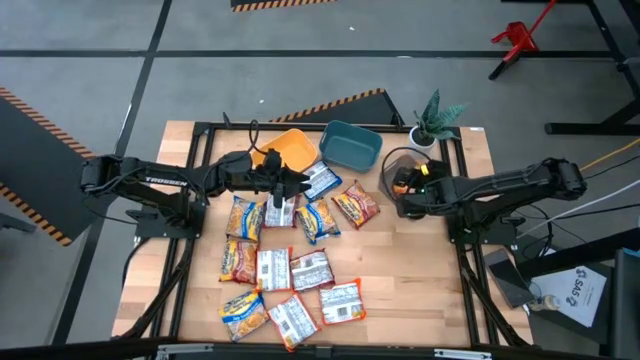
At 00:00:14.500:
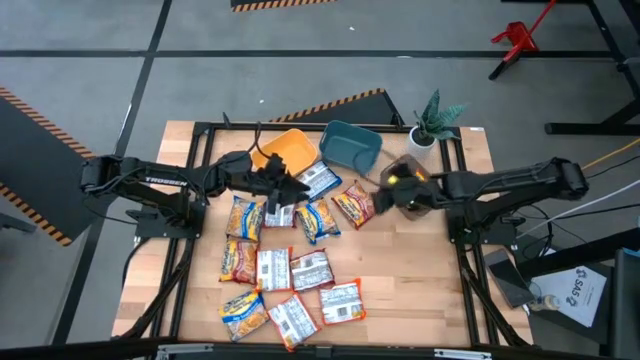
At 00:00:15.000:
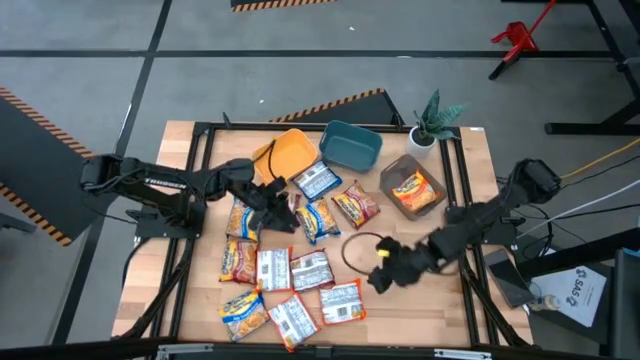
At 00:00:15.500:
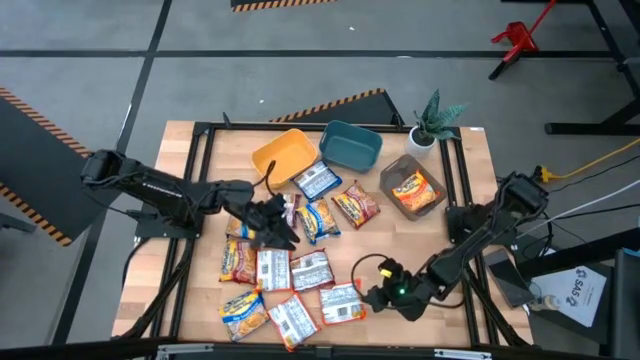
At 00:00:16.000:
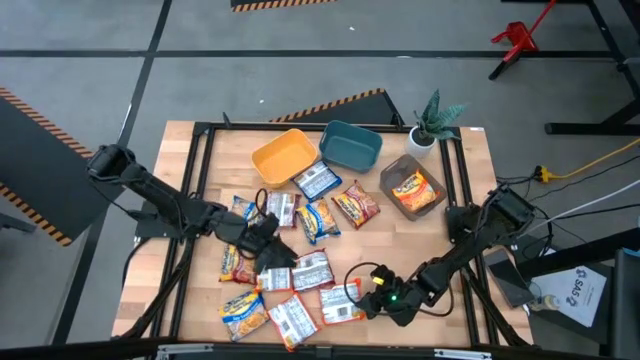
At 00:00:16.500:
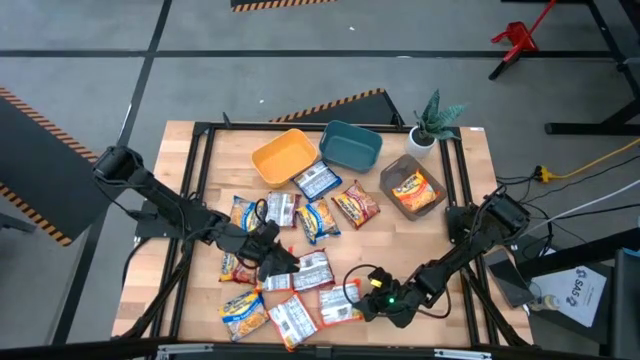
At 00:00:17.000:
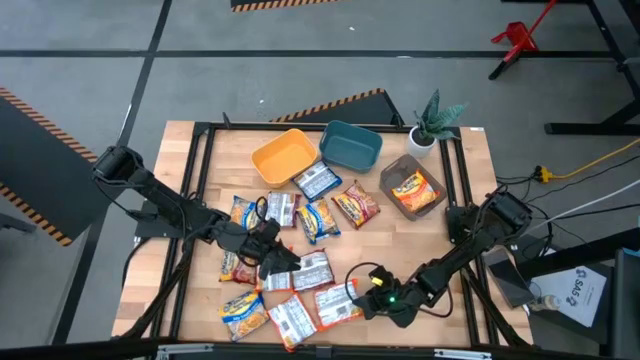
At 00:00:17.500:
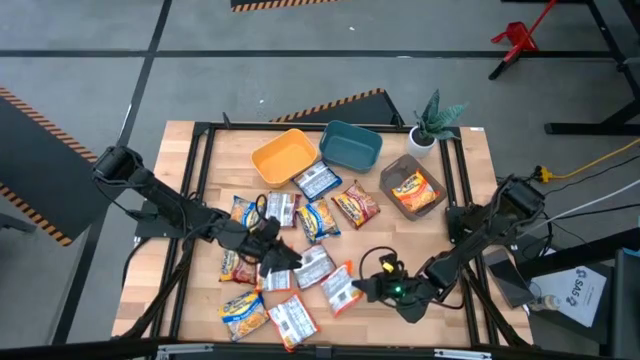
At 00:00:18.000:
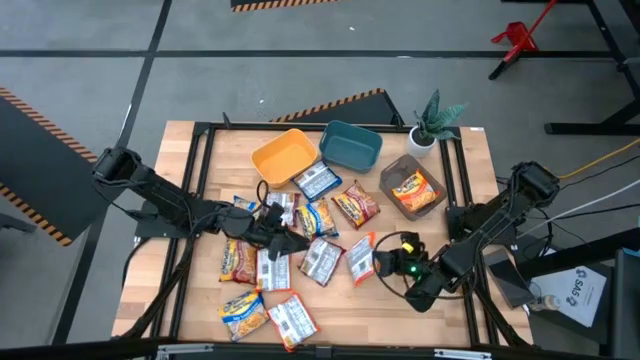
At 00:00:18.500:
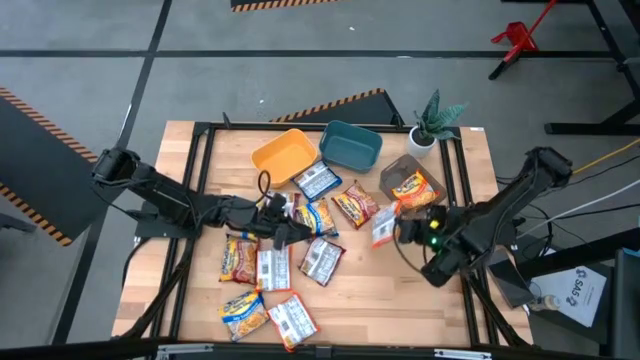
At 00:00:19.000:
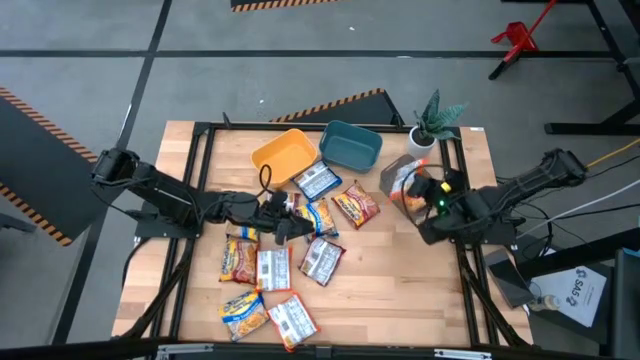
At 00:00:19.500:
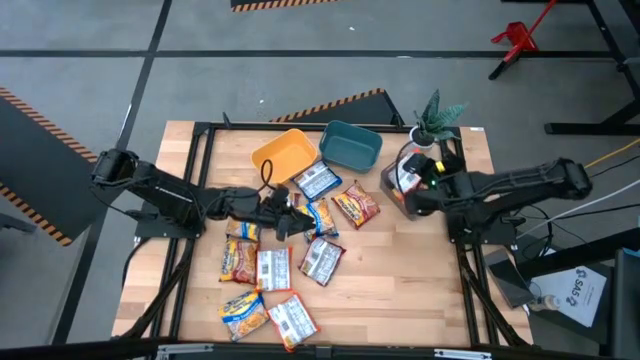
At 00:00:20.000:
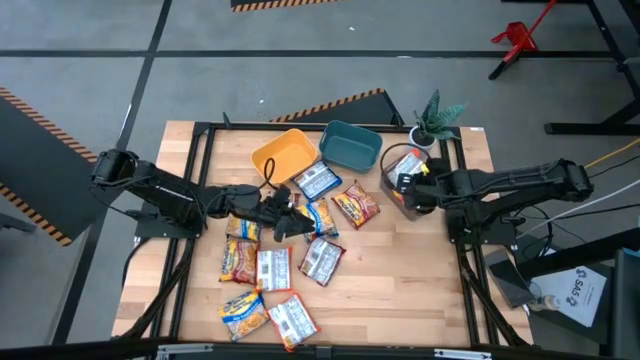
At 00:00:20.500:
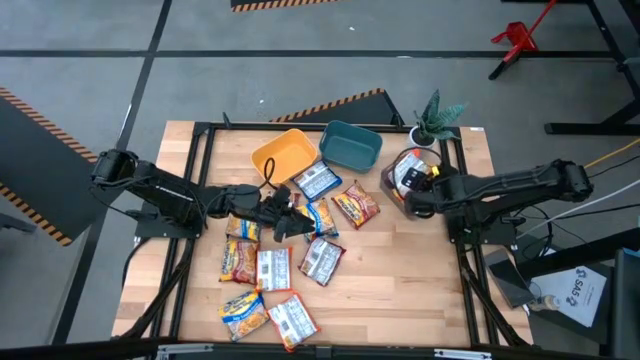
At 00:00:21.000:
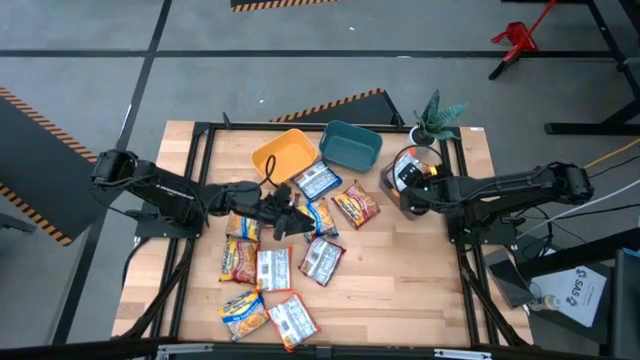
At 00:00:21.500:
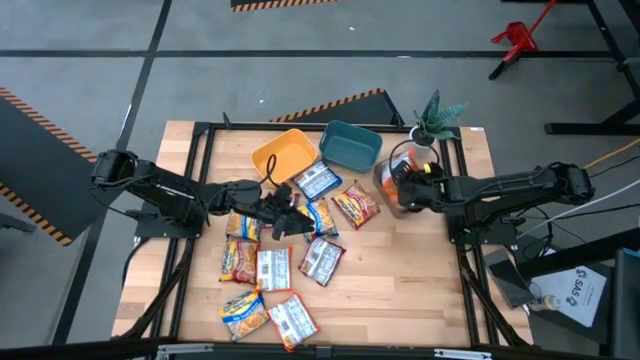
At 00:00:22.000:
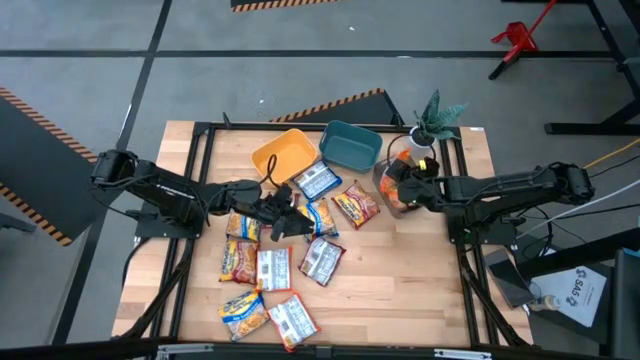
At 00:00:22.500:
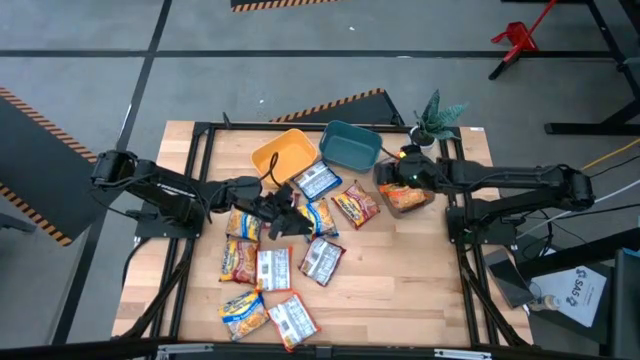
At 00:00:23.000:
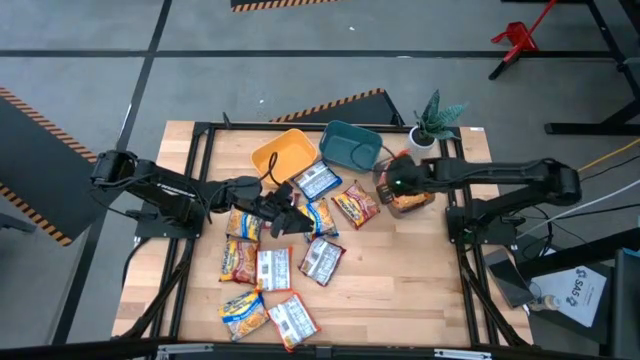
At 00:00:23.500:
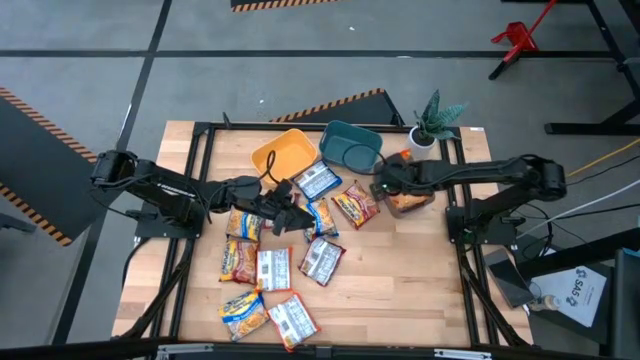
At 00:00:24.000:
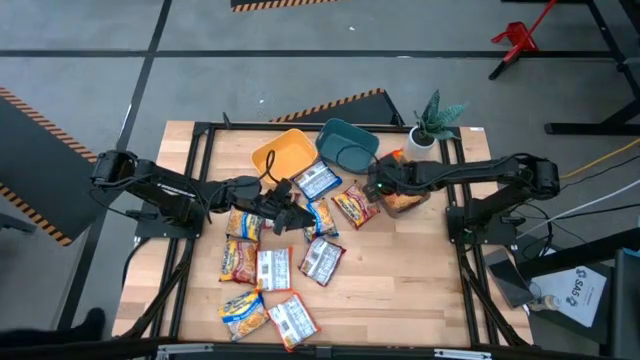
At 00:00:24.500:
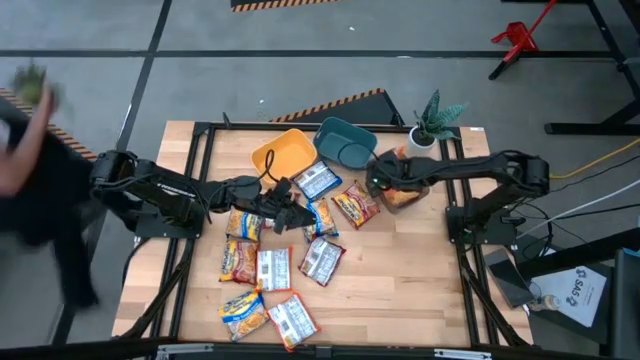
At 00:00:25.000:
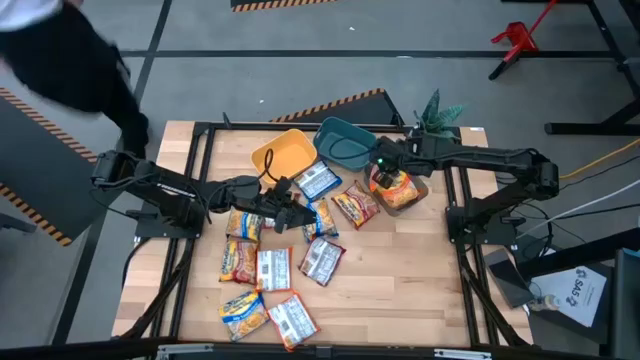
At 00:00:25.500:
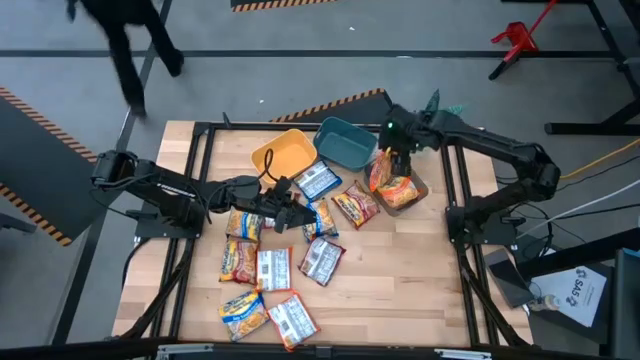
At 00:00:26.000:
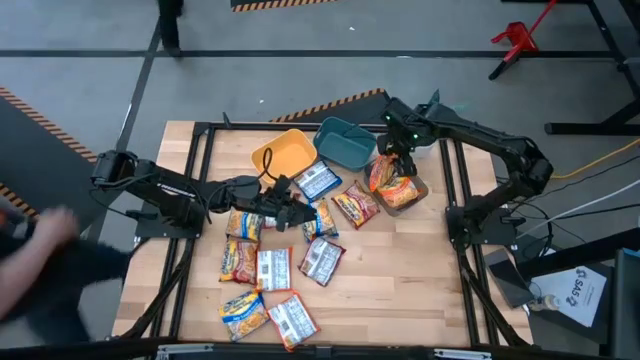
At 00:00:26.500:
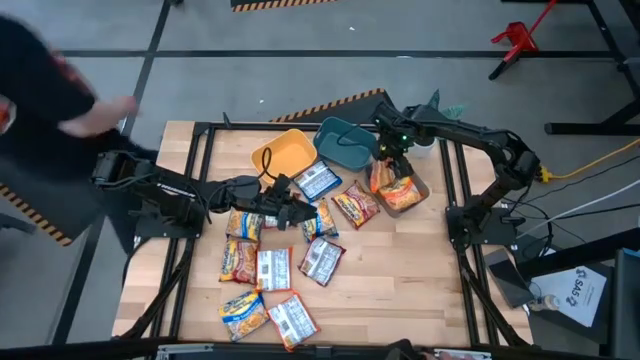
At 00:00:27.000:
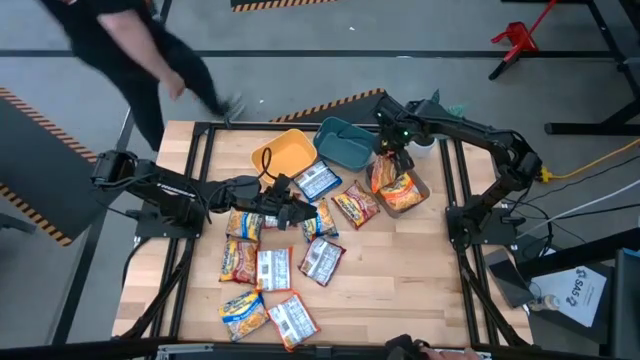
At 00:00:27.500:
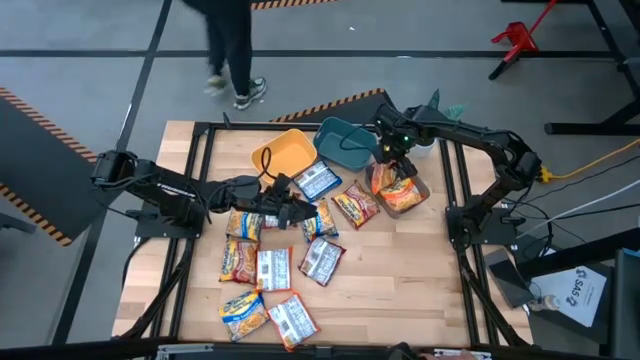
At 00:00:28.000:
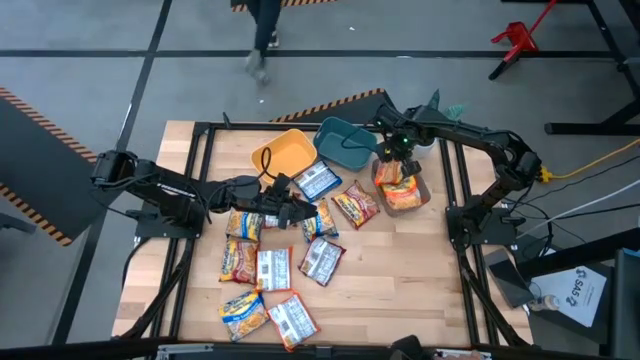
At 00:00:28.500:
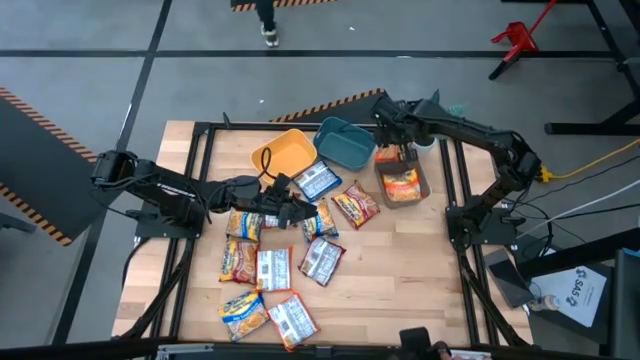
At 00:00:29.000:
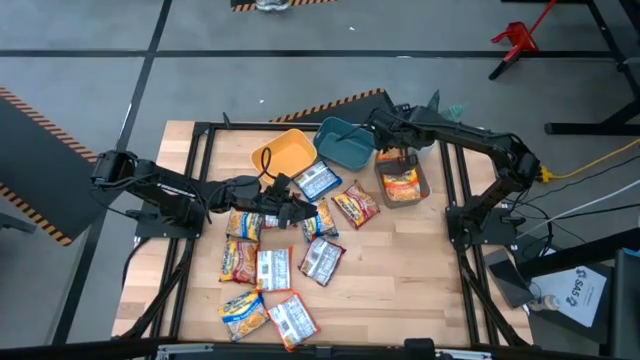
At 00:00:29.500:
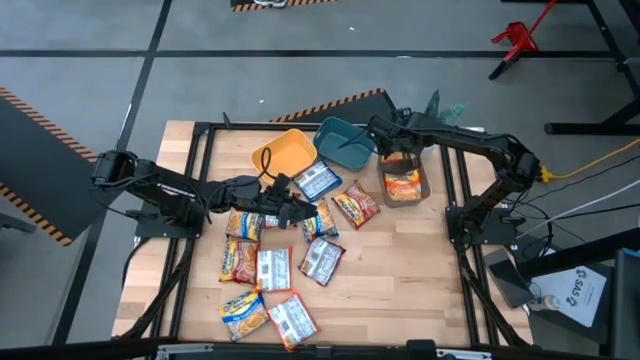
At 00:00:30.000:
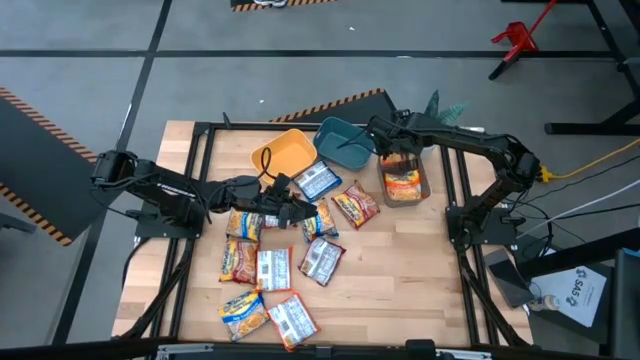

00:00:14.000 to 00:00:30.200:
Task: Sort Maruchan noodles
Put the bottom right orange noodle pack into the black bin

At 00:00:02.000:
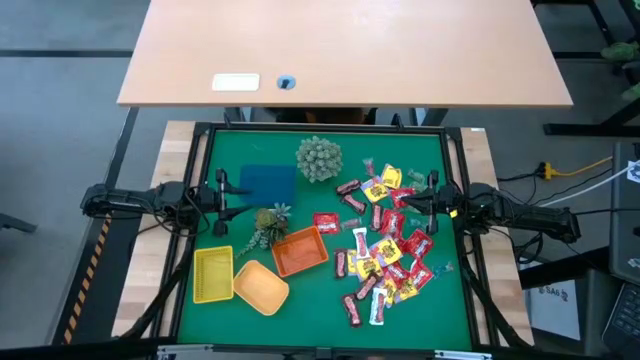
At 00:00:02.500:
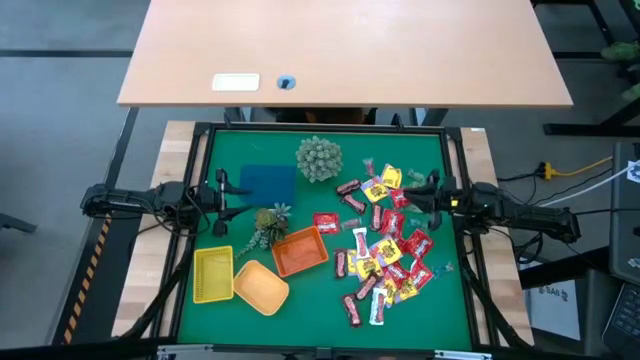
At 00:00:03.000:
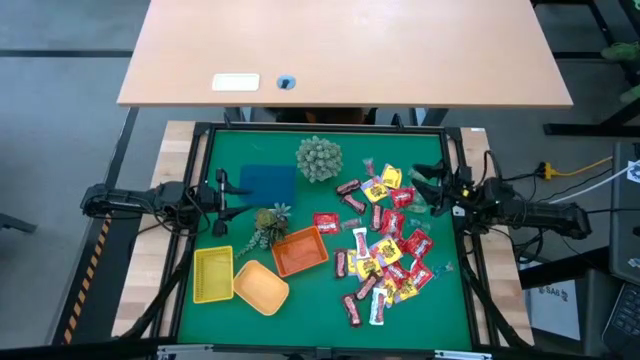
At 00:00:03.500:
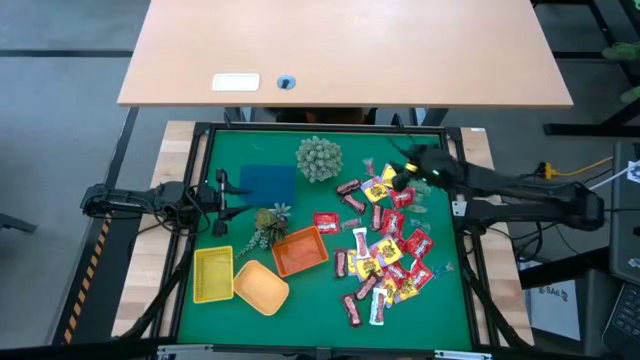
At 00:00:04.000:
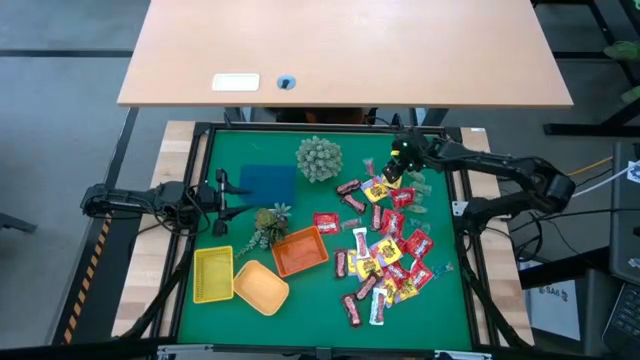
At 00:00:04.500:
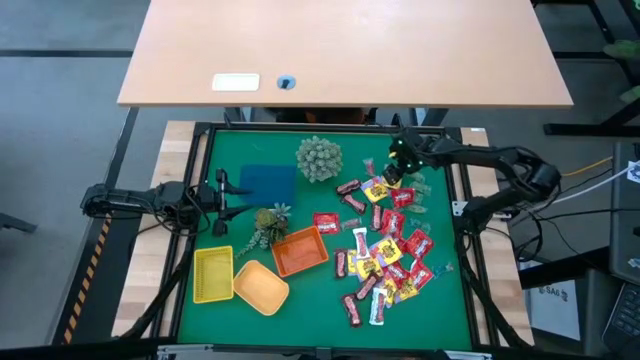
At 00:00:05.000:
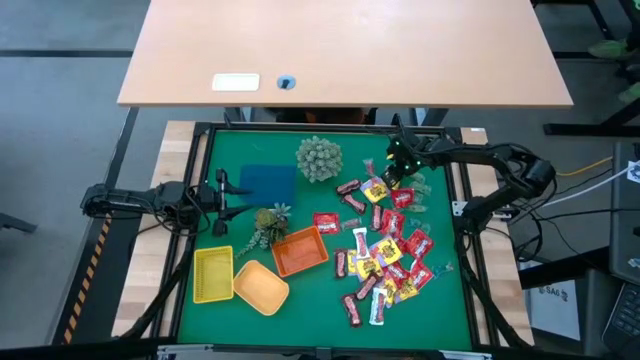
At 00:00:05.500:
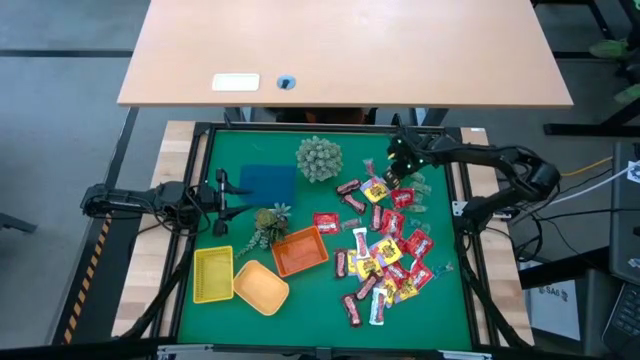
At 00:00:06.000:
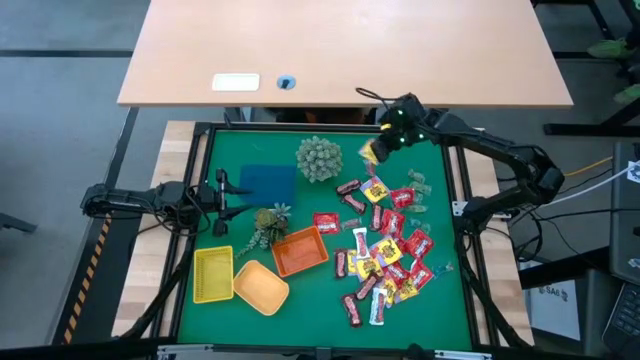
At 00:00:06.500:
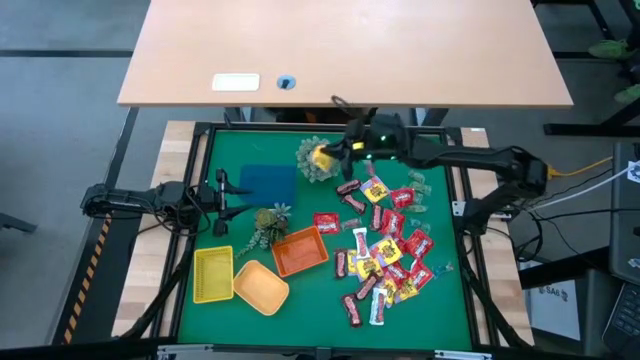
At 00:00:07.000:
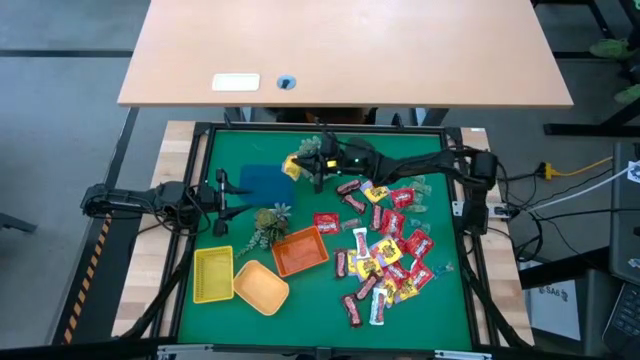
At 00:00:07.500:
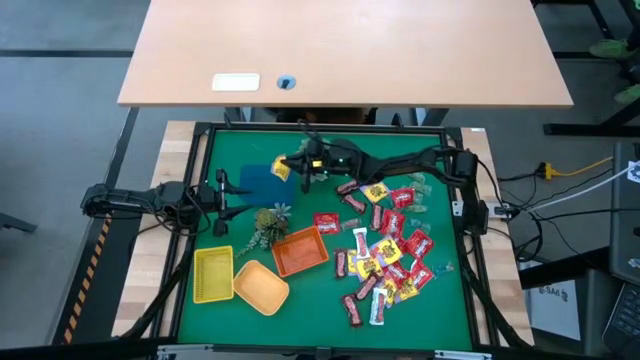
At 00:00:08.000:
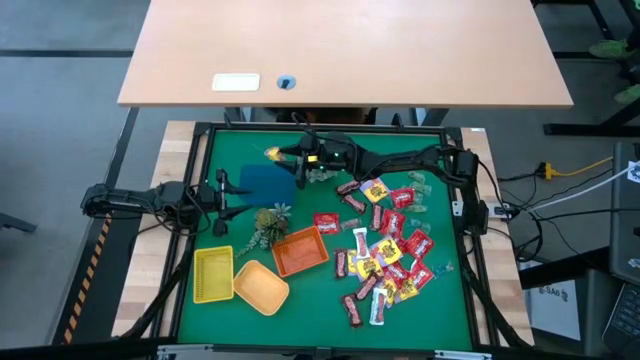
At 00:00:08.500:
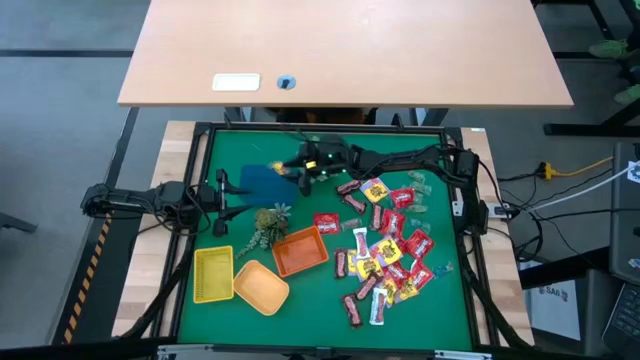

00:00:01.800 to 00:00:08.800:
Task: Sort candy
Put the yellow candy into the blue bin
